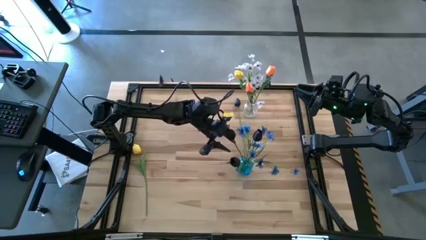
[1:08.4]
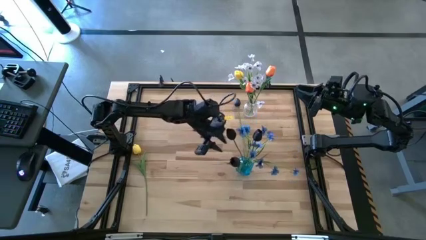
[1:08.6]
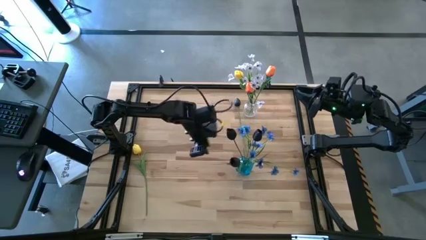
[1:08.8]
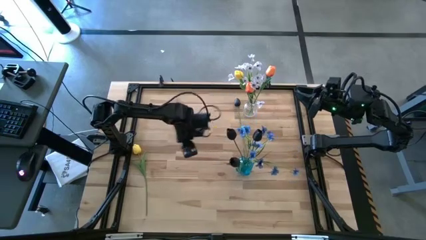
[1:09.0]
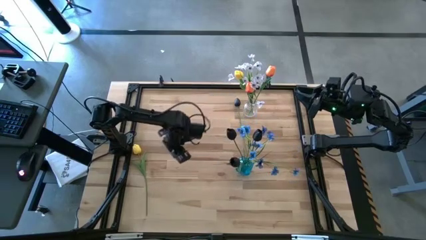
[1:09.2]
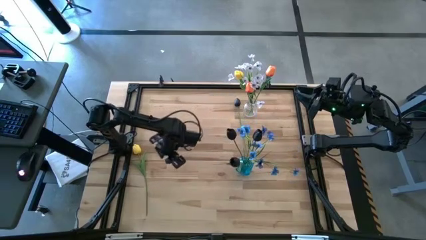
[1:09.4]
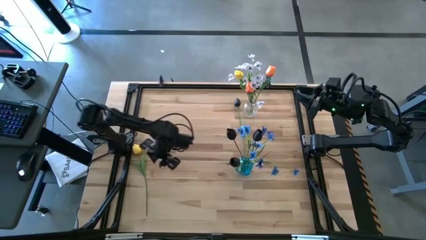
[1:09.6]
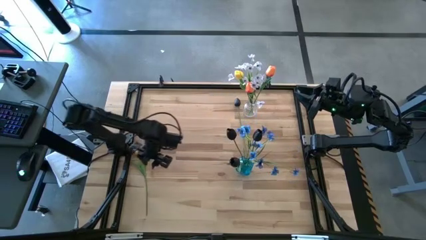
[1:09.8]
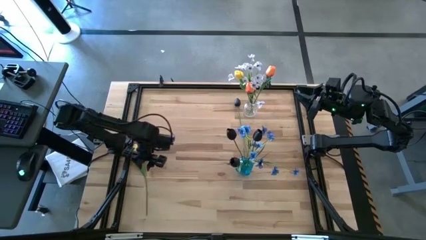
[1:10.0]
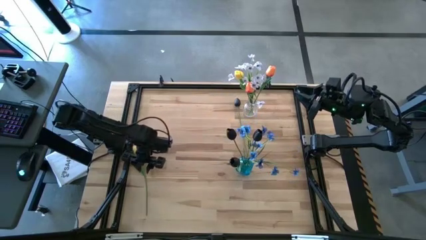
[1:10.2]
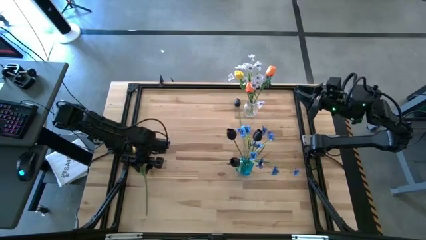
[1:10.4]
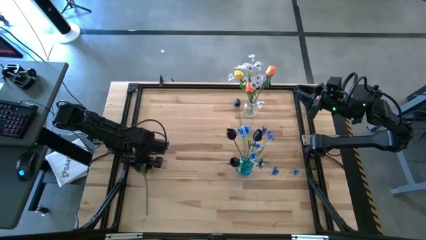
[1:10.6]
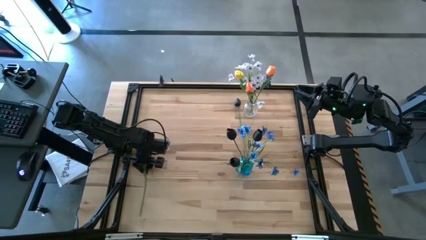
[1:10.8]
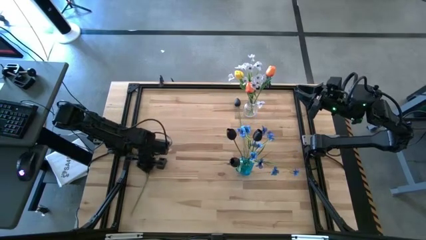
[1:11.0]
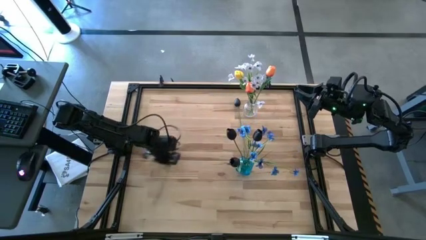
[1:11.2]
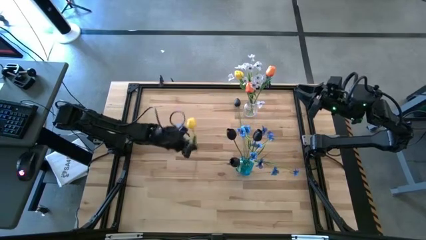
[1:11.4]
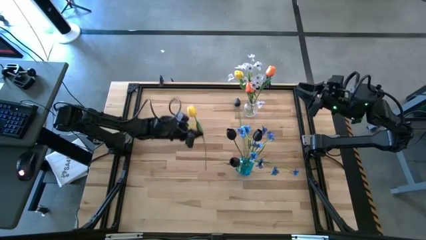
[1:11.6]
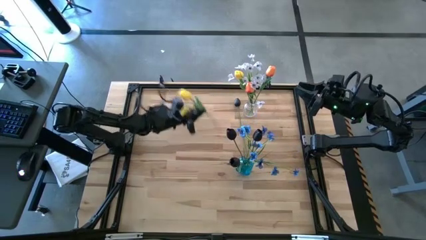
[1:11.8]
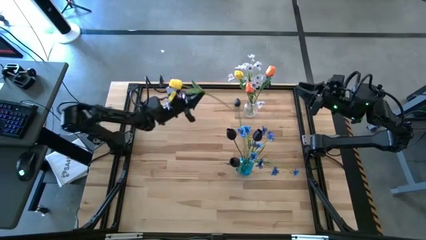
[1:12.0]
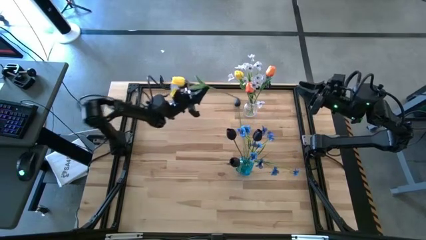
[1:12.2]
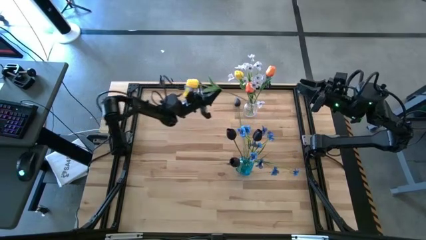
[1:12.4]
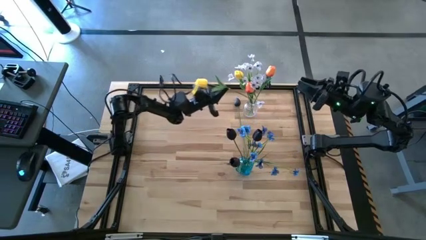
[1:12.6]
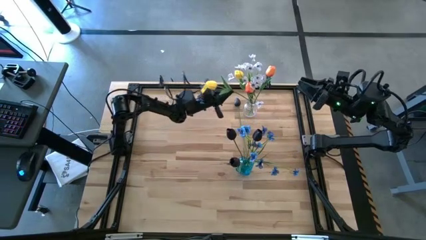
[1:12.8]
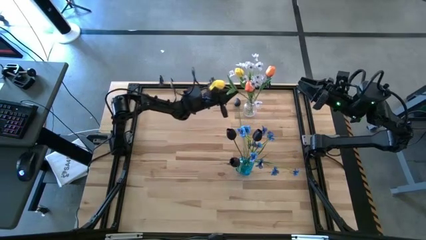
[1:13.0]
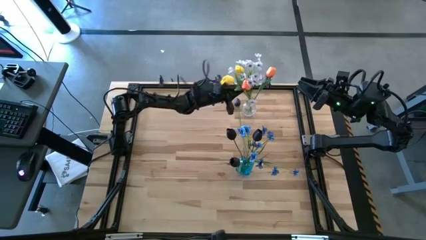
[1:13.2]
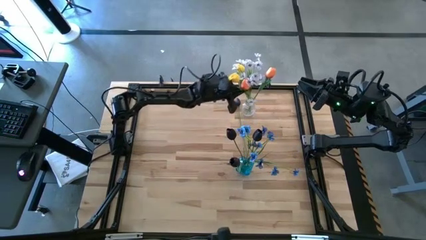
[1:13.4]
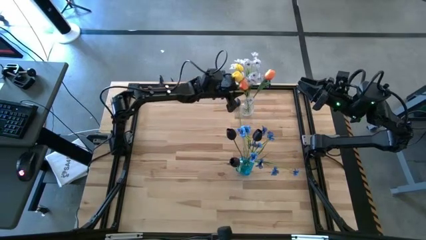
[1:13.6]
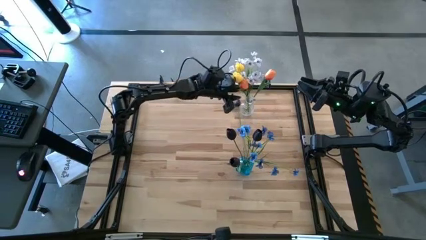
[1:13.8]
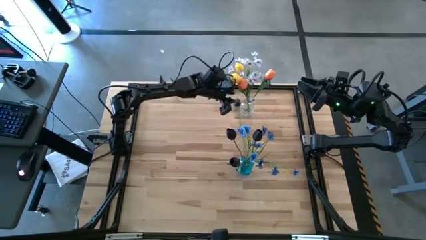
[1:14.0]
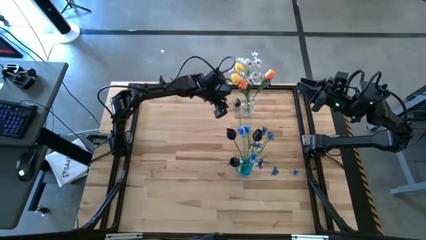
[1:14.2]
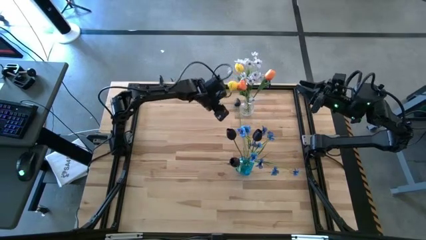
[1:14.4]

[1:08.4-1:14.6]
Task: Sort flowers into vase by color
Put the yellow flower into the transparent vase

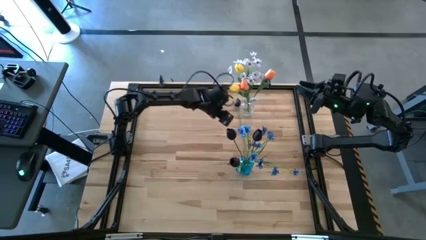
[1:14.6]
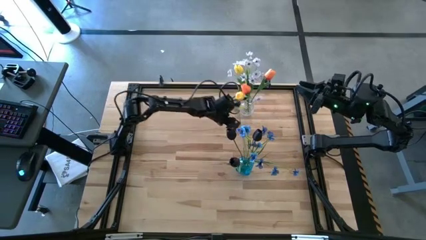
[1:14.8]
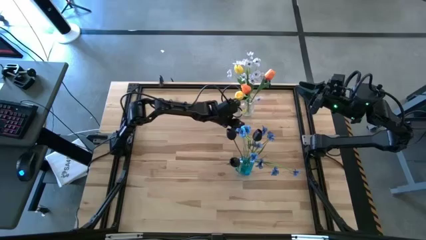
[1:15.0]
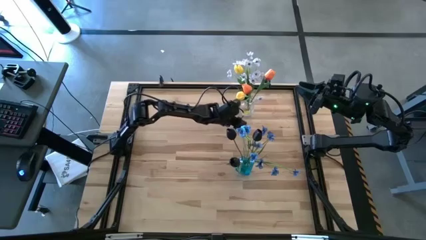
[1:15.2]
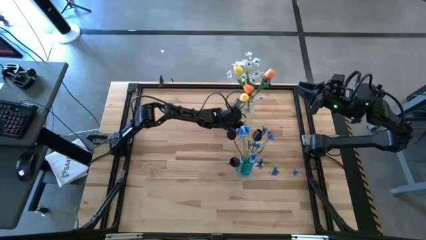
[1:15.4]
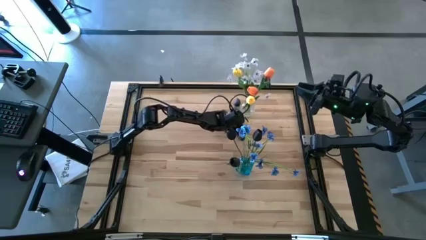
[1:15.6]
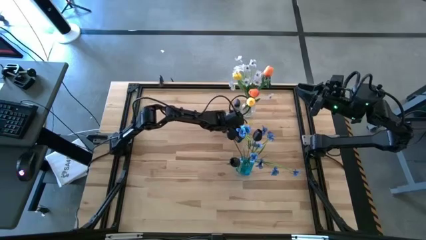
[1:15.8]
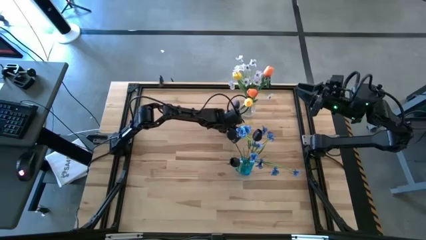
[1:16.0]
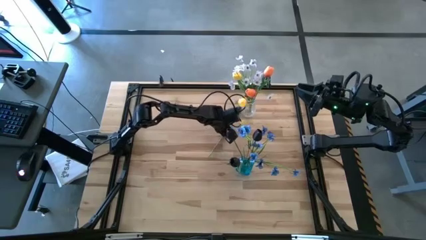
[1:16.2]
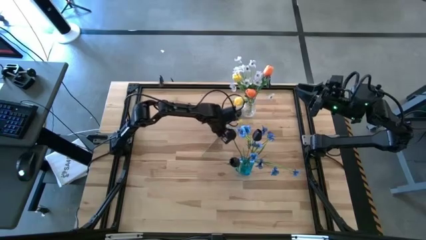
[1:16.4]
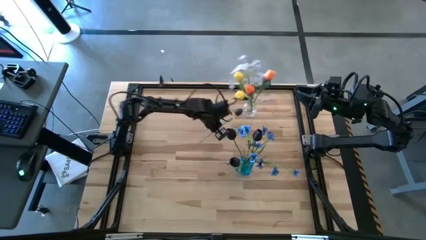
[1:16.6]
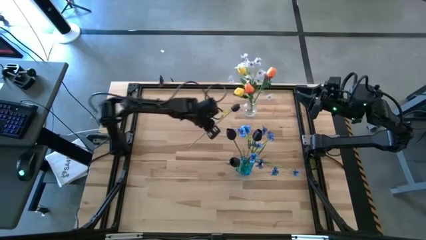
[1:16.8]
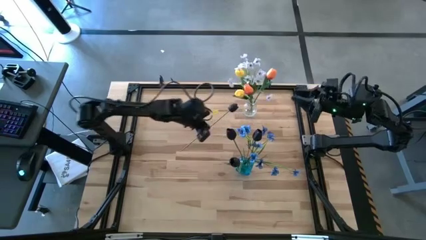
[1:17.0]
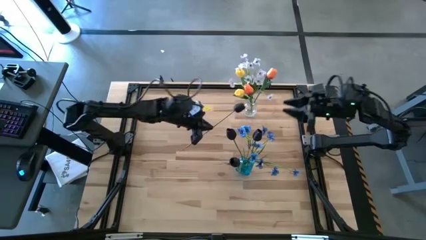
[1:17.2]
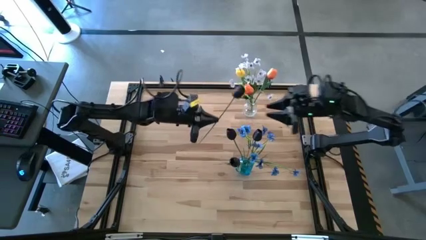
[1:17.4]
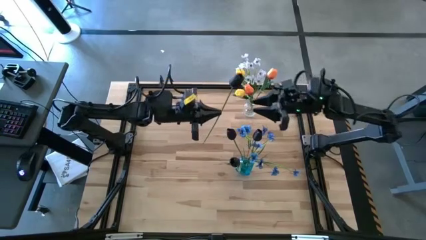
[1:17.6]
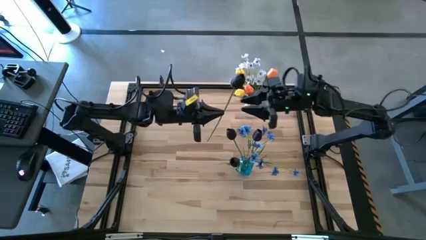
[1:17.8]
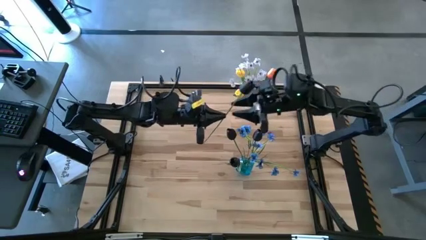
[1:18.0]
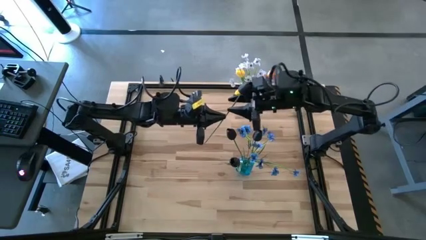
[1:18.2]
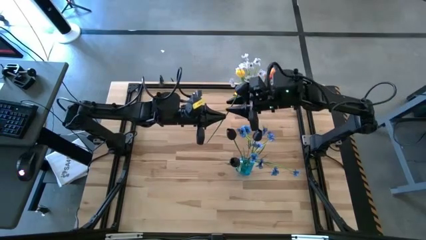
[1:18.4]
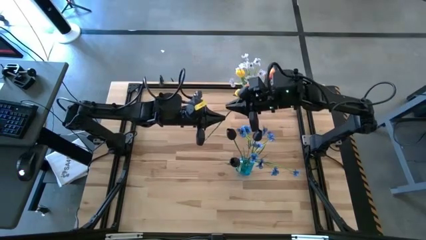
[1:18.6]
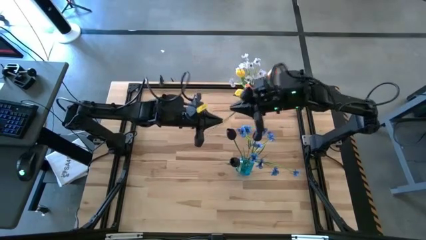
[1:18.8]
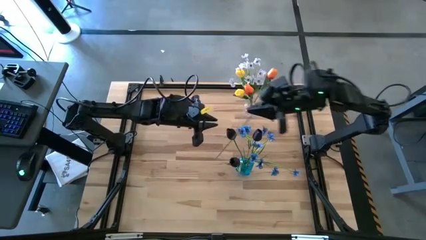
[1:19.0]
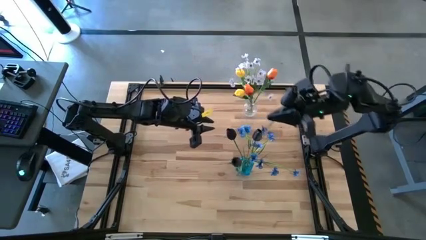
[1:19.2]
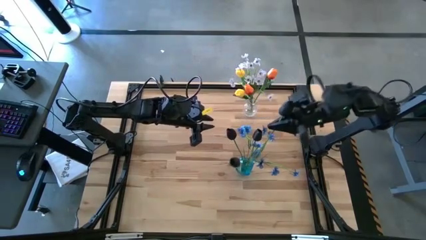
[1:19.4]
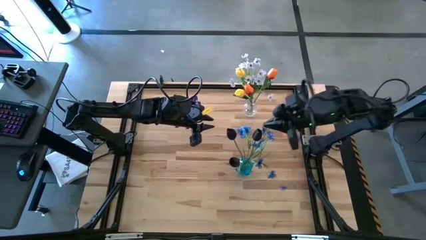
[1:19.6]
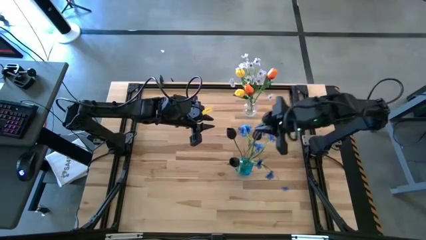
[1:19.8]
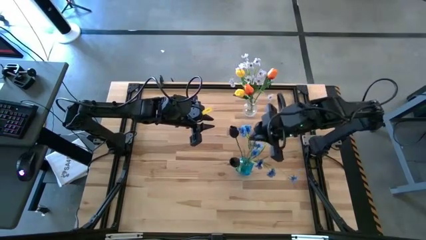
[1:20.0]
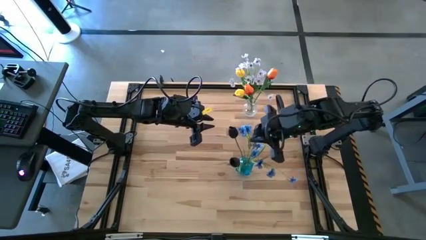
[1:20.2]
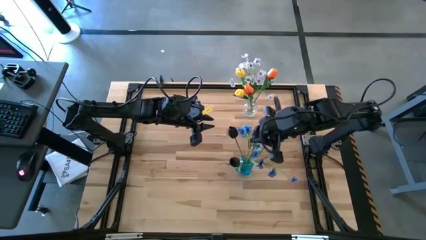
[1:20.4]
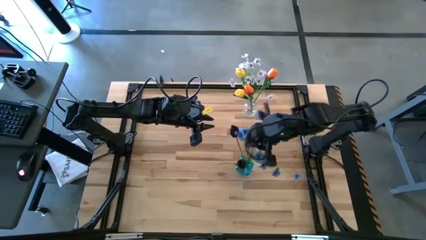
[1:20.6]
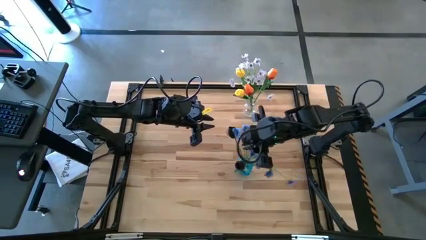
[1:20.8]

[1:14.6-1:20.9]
Put the black flower into the blue vase

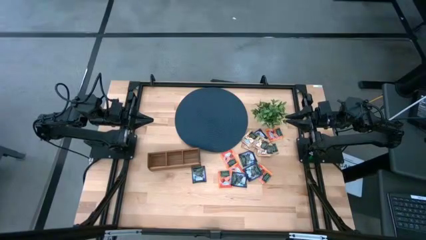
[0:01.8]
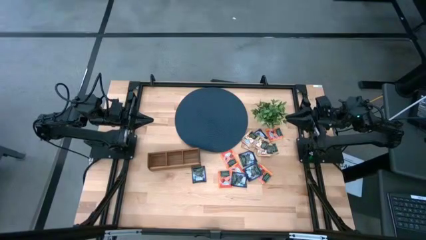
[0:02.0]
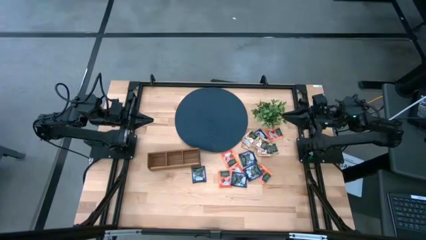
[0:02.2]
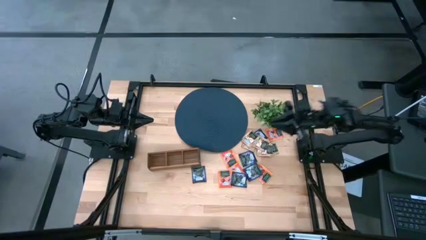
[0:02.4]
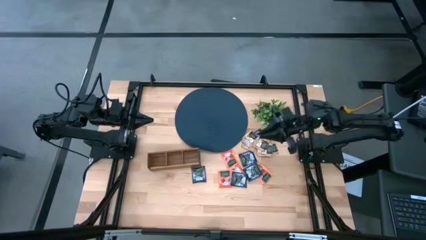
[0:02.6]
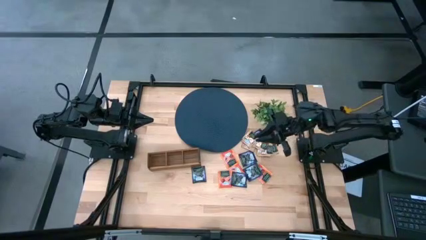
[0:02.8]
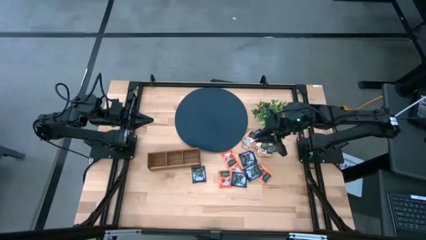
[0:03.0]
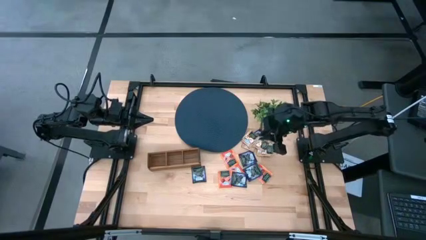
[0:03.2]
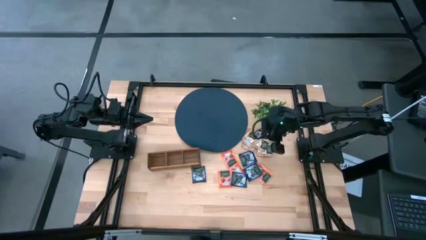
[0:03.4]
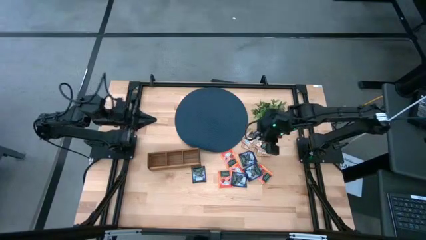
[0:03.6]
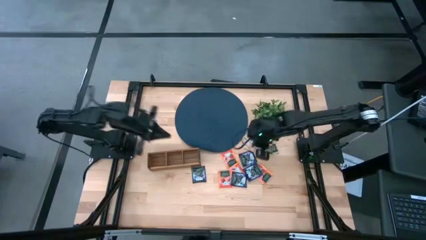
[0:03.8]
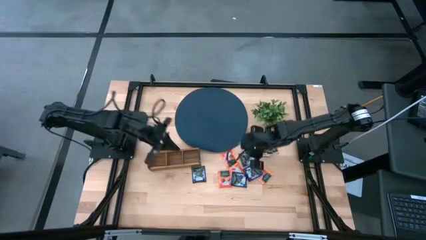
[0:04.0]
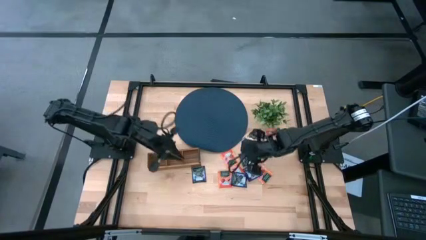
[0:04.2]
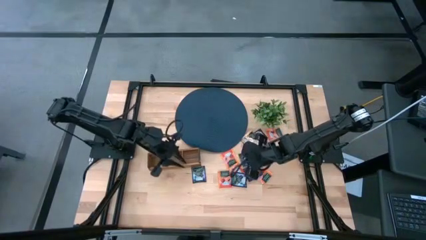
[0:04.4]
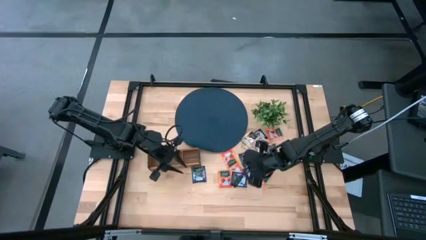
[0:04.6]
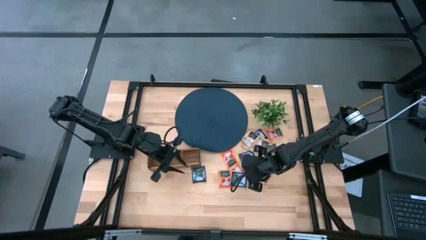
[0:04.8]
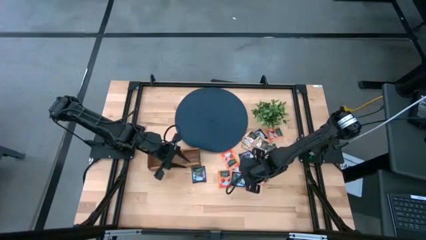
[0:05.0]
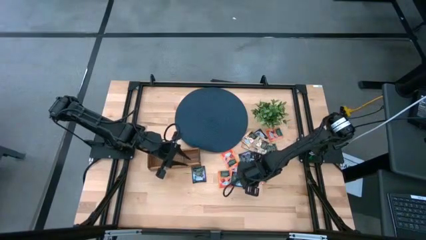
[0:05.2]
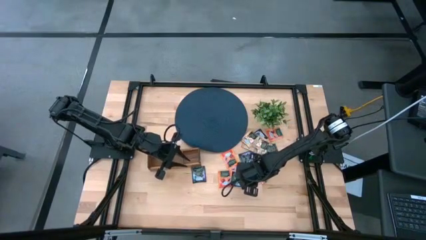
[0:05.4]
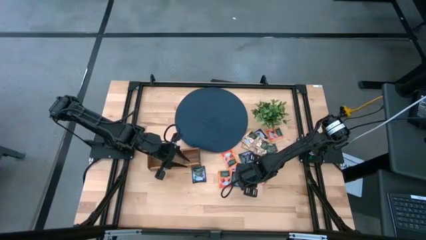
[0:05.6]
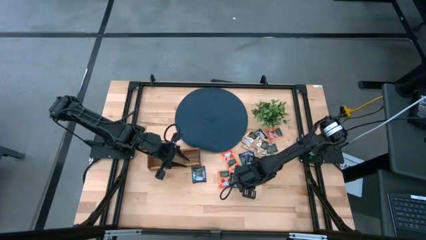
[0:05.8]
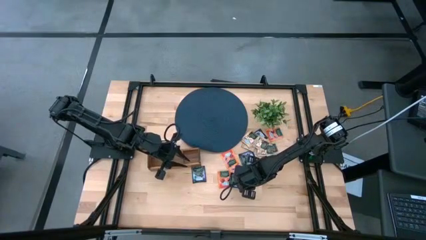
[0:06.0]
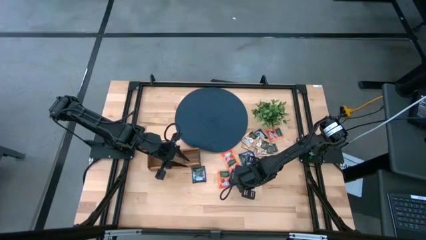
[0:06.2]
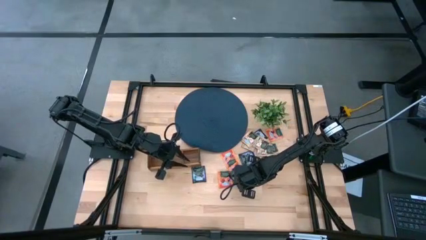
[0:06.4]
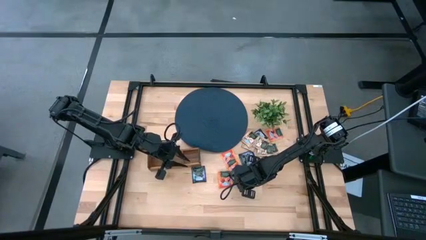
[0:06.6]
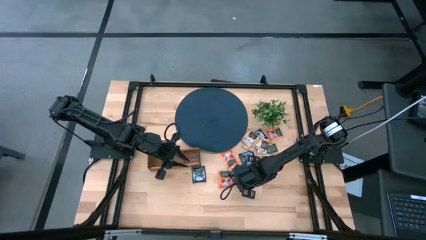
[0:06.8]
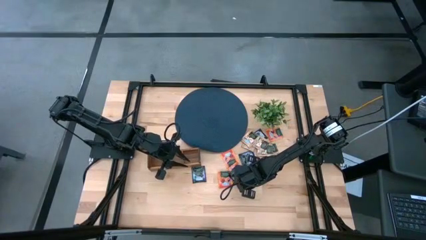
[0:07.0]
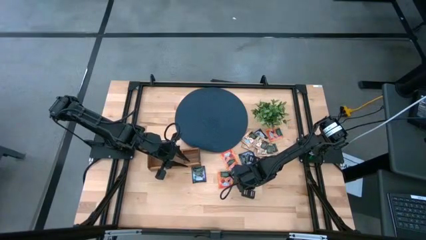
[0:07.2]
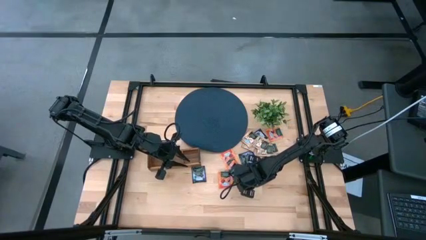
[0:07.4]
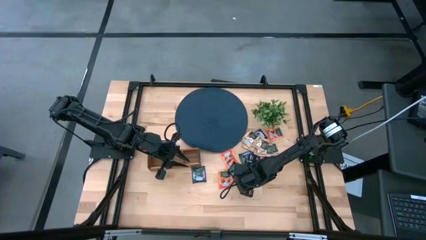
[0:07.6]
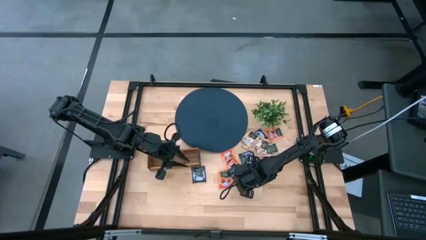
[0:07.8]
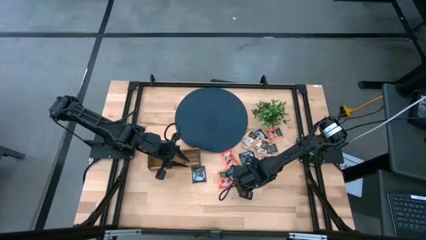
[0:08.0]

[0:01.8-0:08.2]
Task: Pick & Place Tea
Put the blue tea bag into the middle section of the wooden organizer
